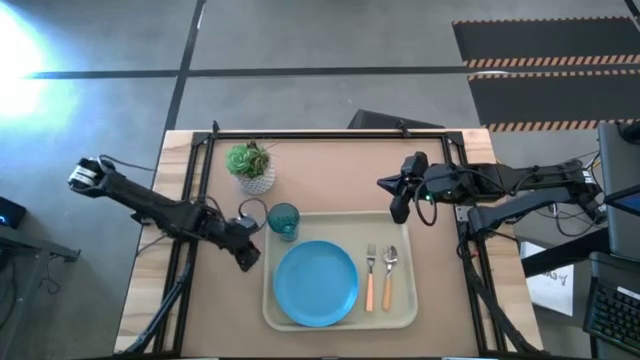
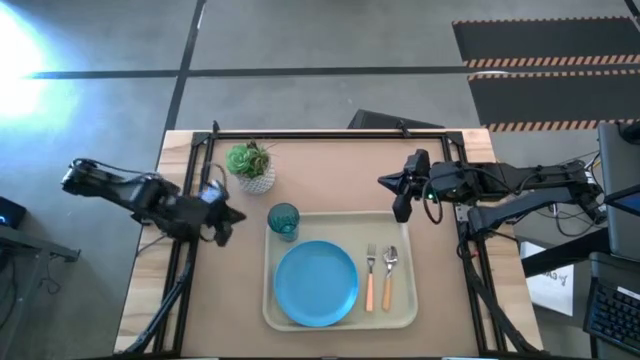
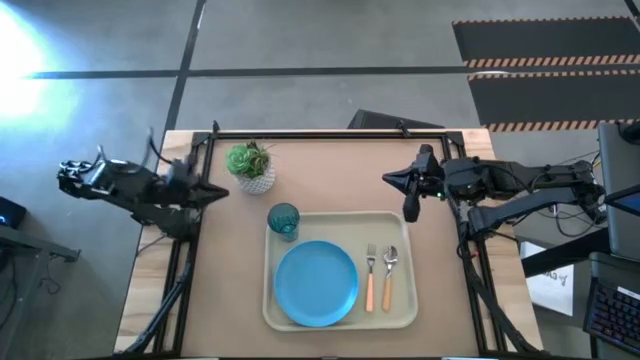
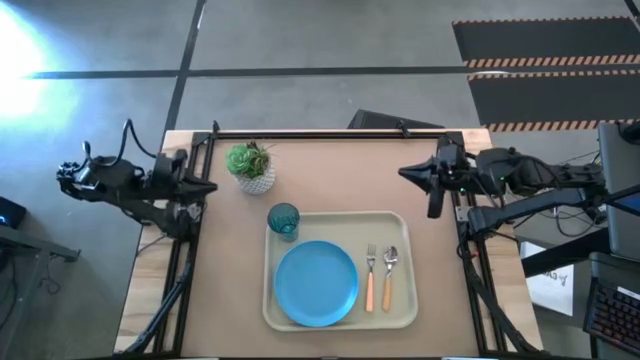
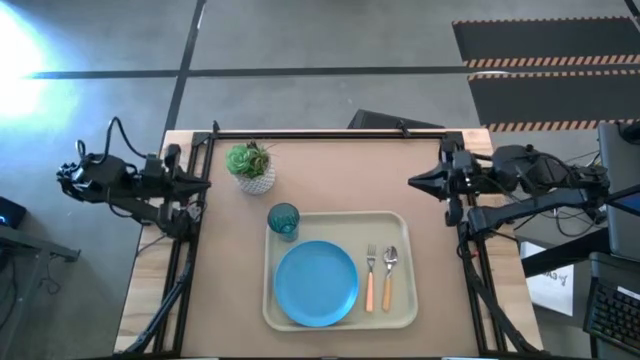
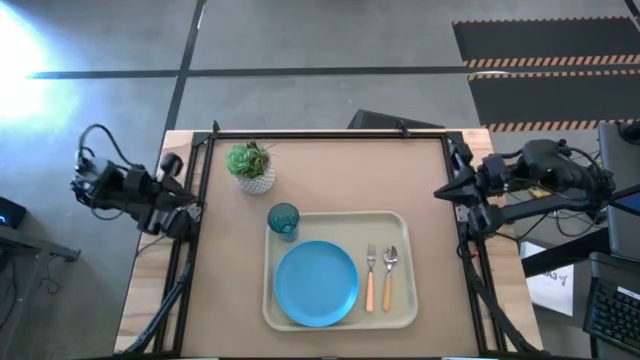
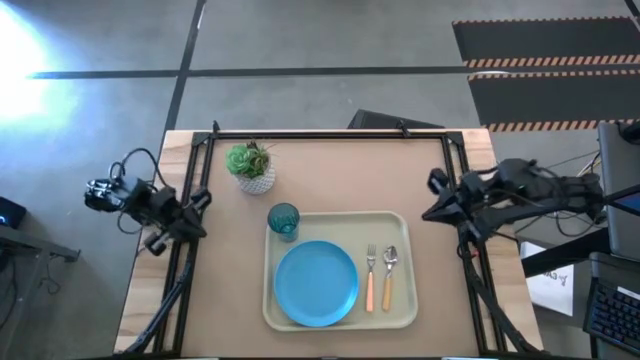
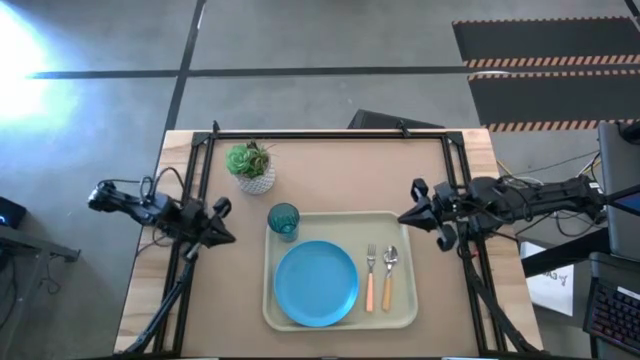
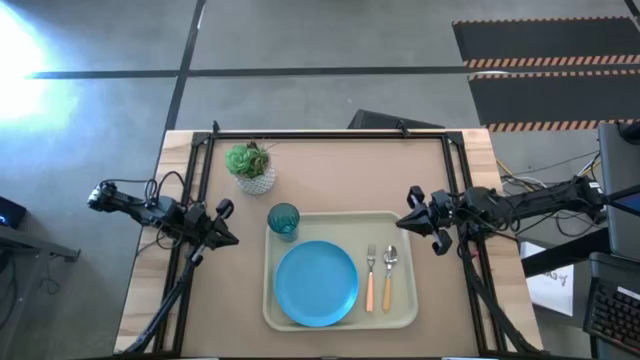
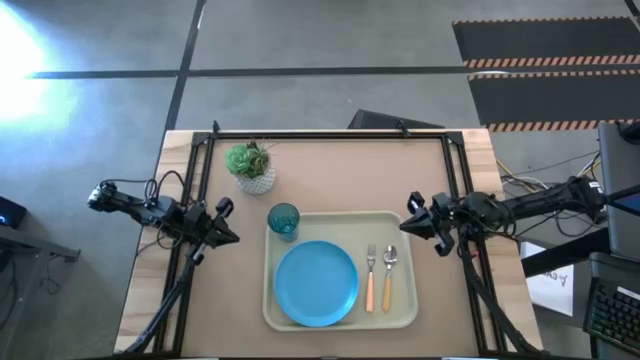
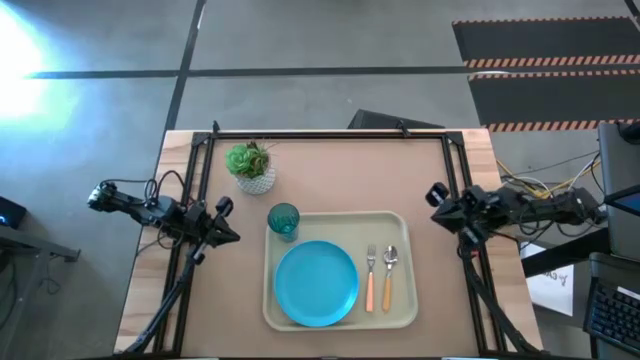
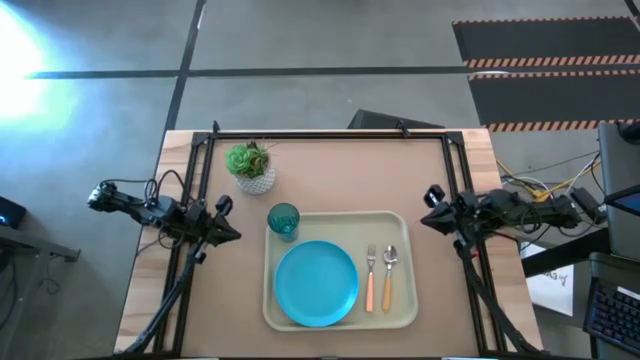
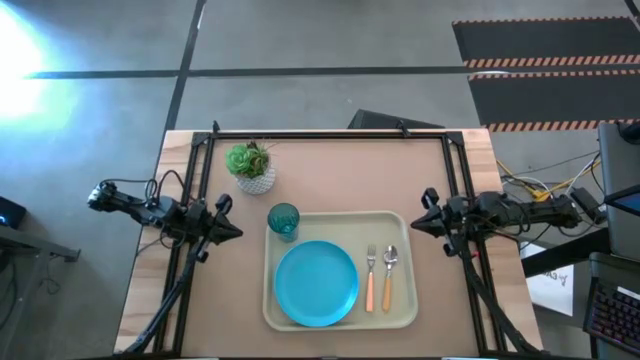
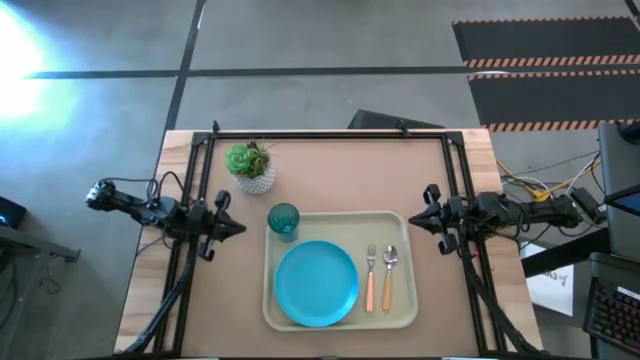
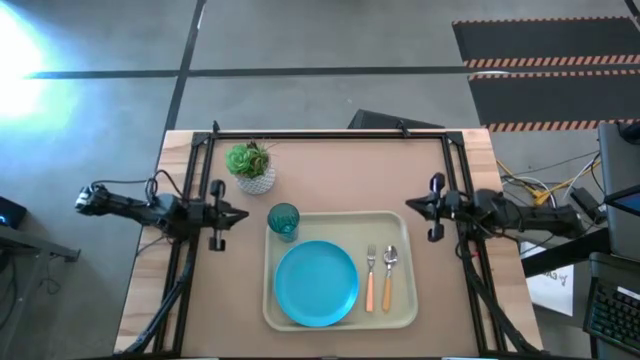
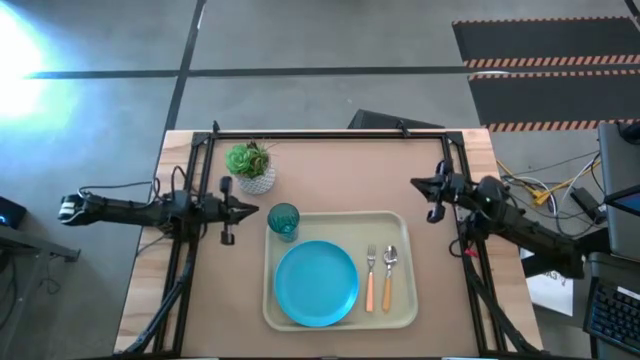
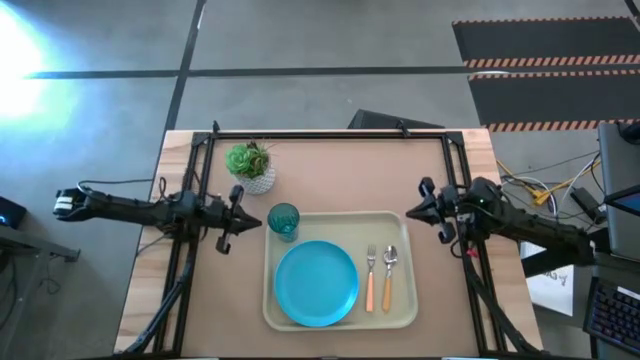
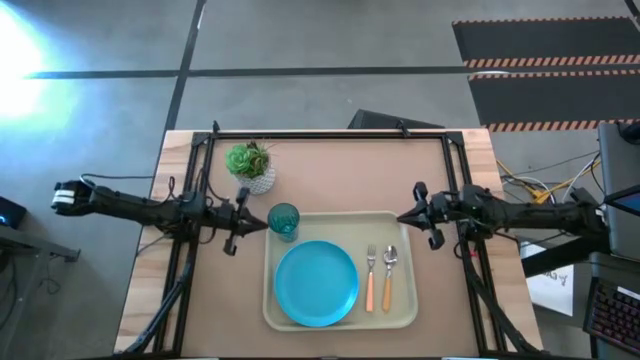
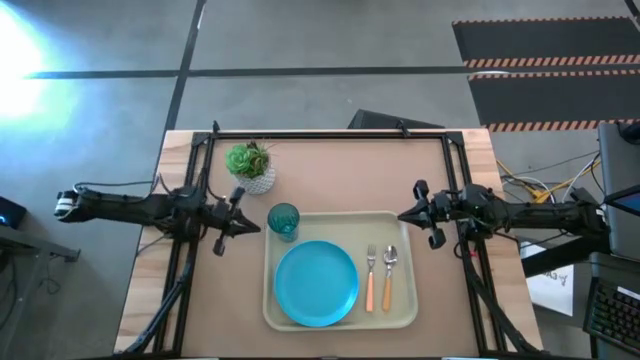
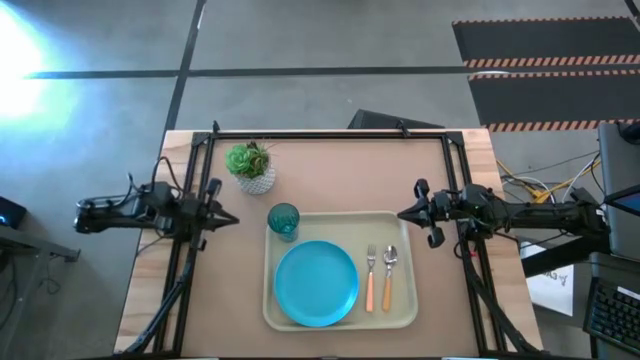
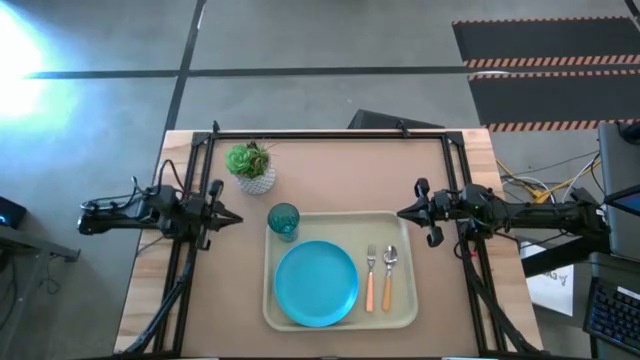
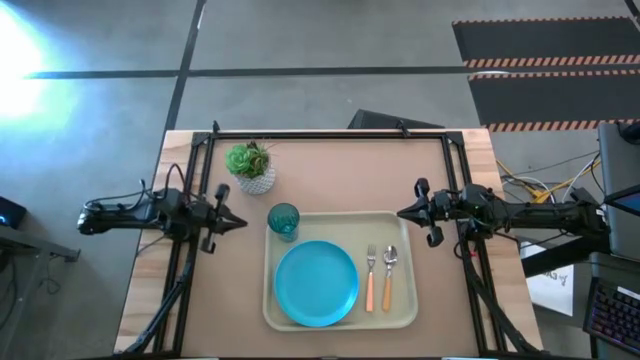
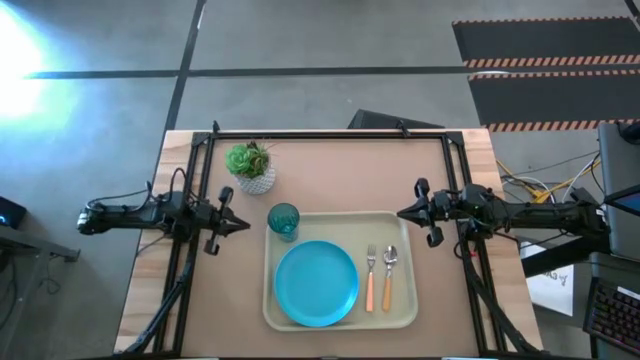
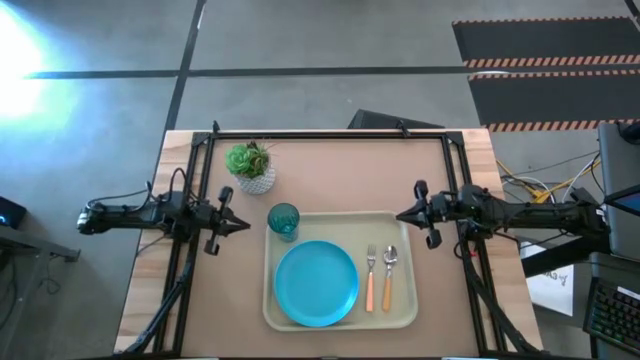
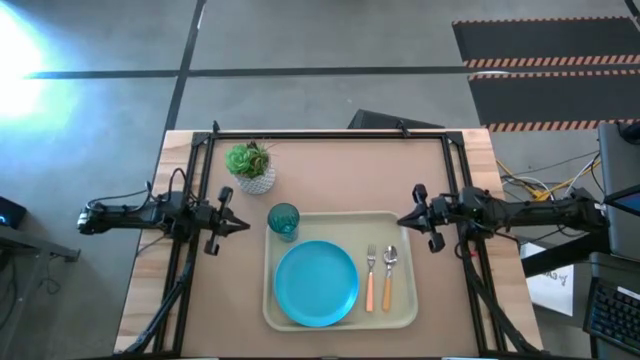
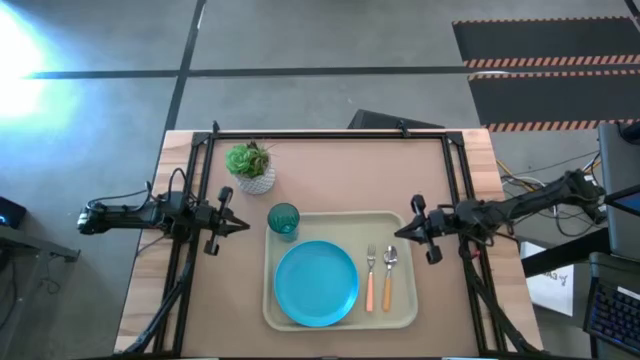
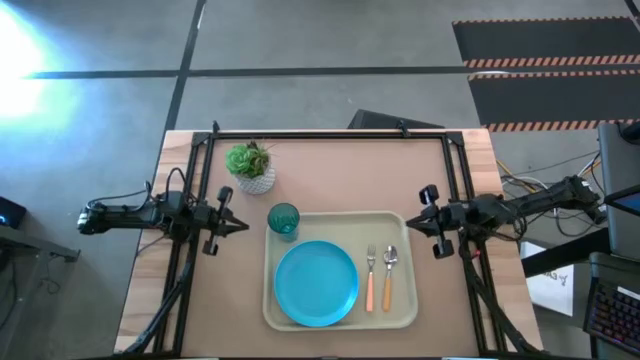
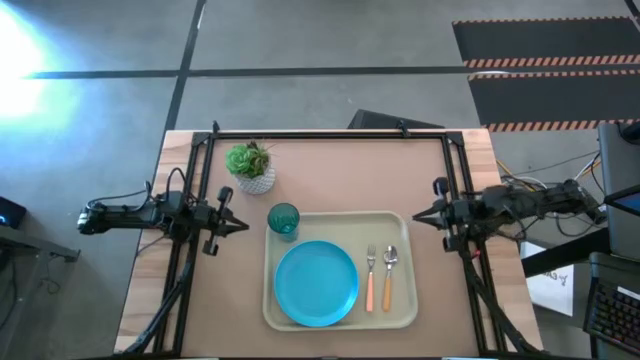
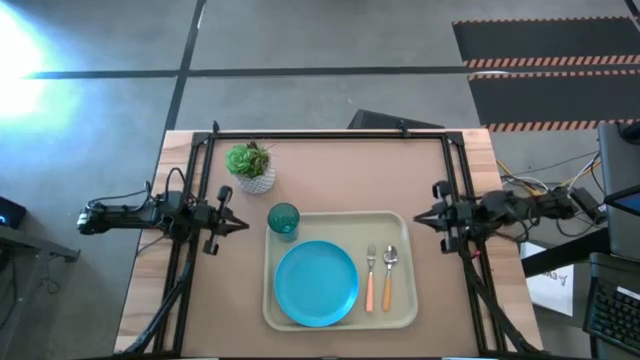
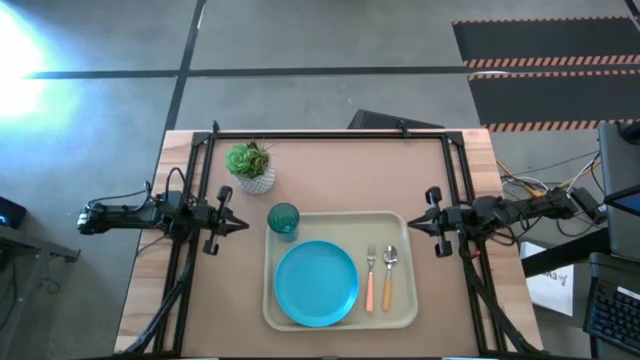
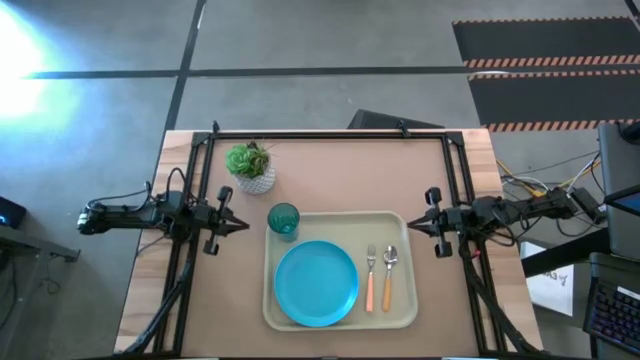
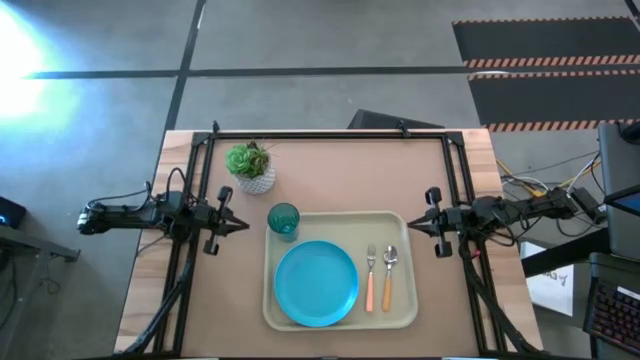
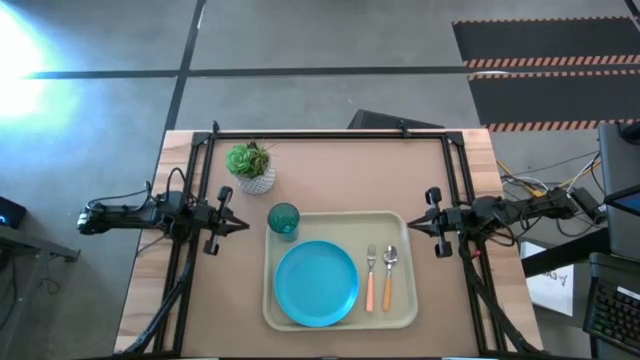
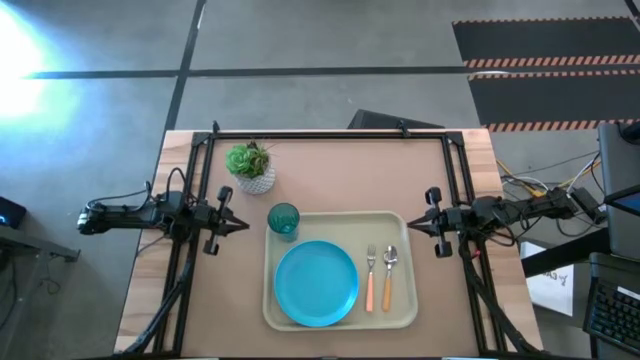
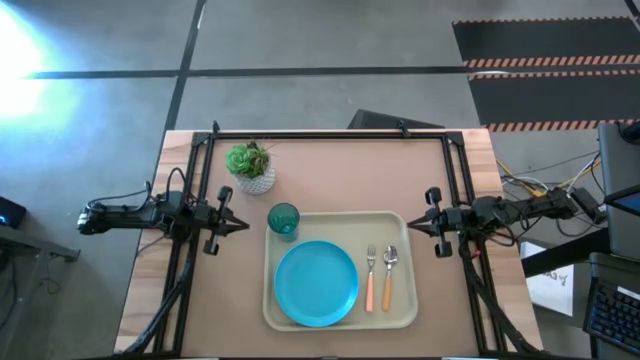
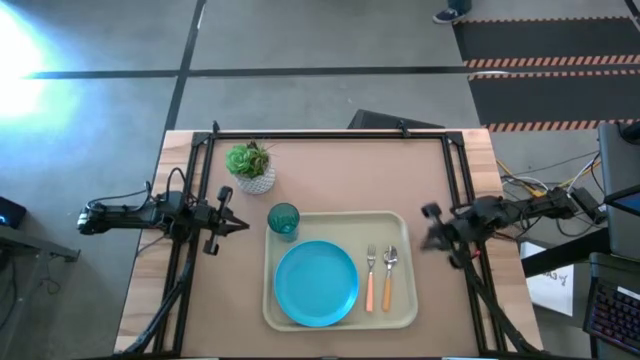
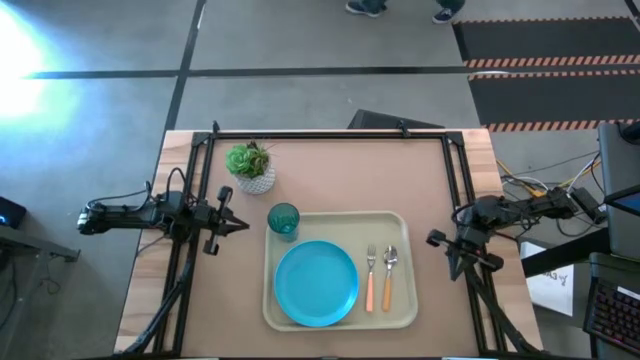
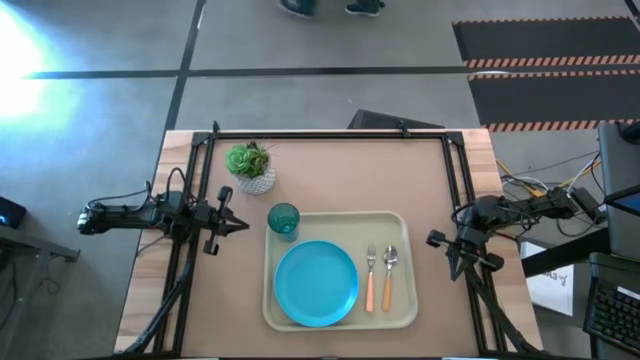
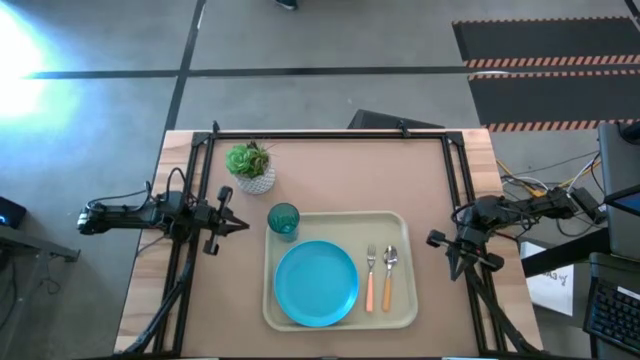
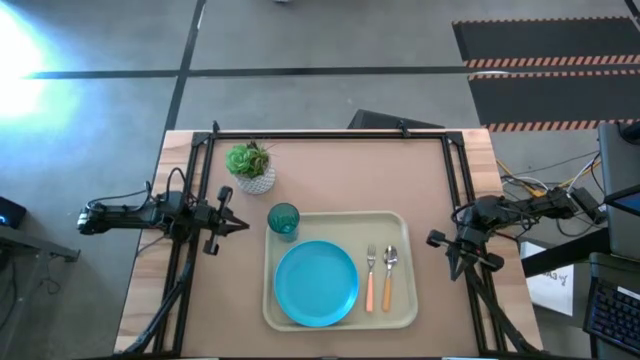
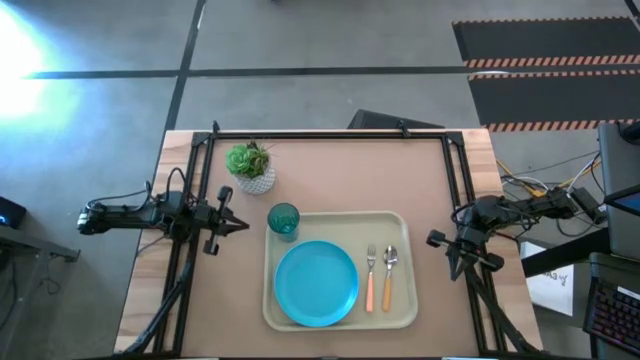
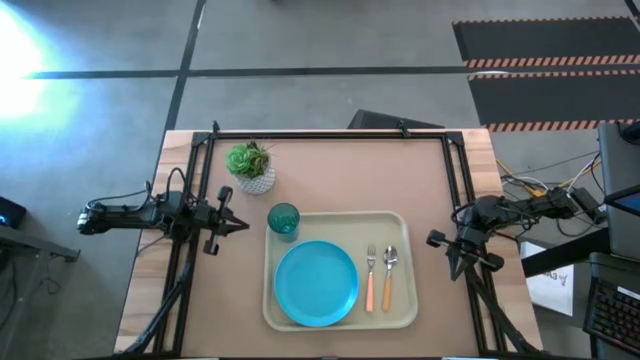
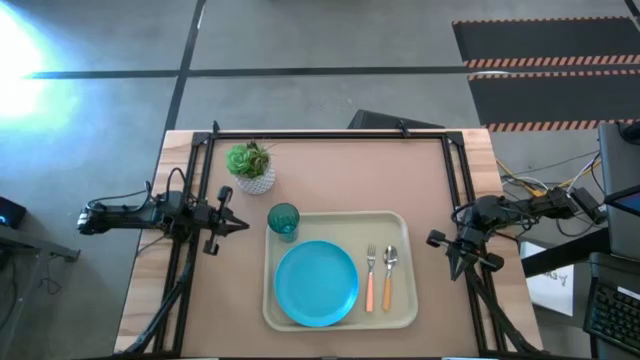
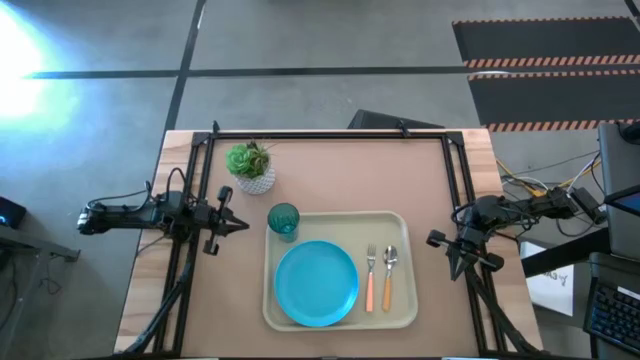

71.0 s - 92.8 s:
Task: Pick and place plate/cup/fork/spoon on tray
Return to Home Position
